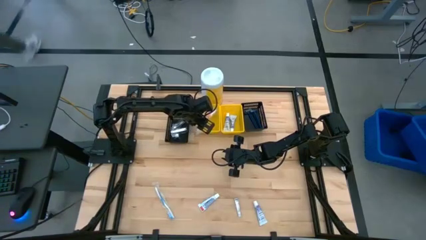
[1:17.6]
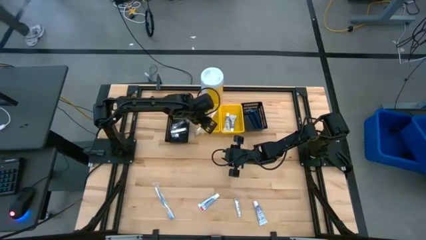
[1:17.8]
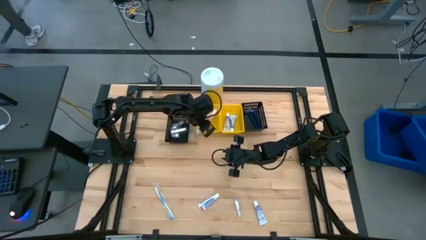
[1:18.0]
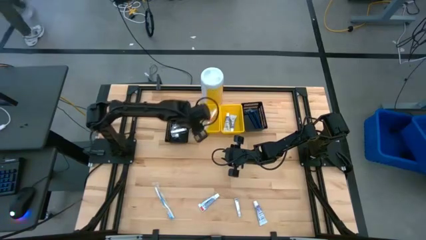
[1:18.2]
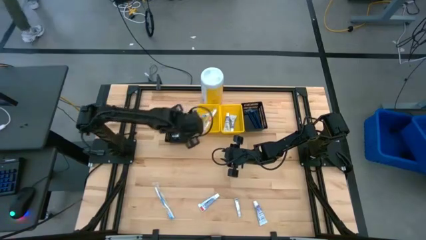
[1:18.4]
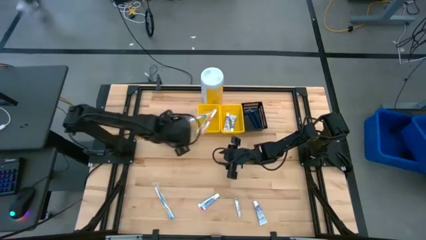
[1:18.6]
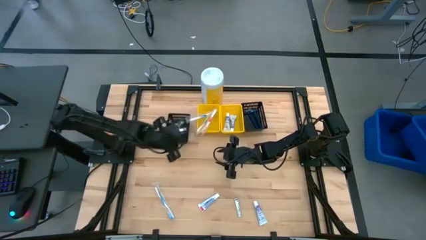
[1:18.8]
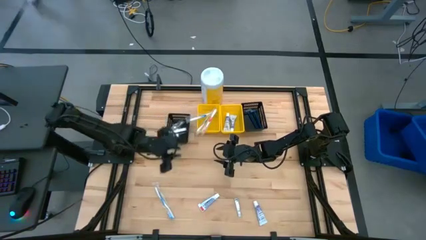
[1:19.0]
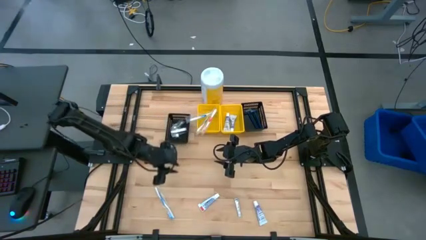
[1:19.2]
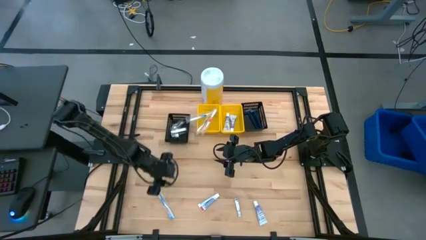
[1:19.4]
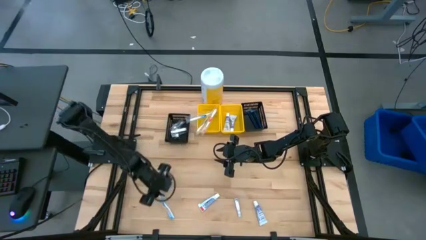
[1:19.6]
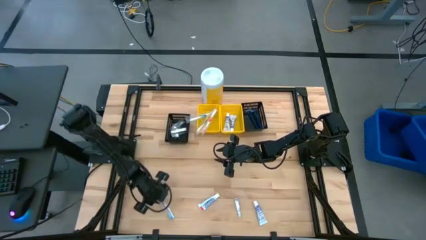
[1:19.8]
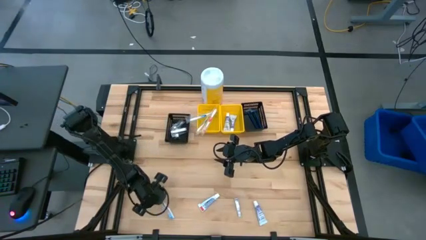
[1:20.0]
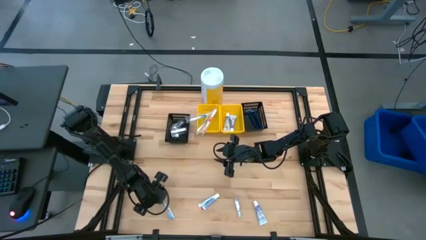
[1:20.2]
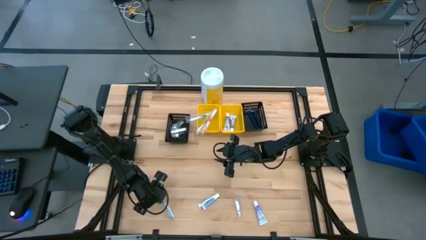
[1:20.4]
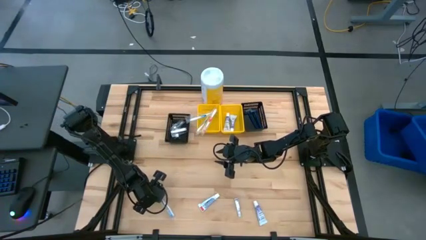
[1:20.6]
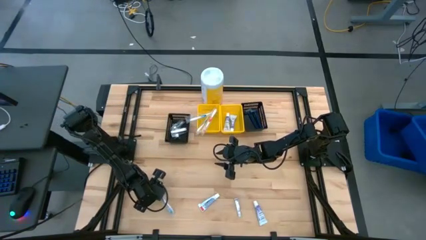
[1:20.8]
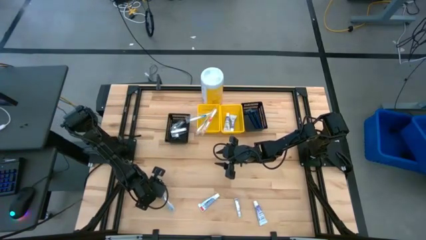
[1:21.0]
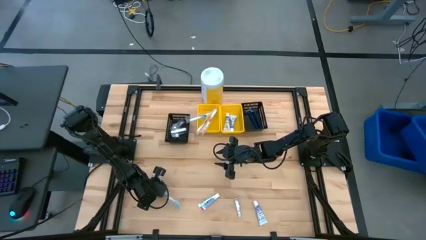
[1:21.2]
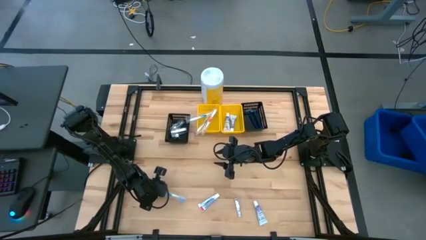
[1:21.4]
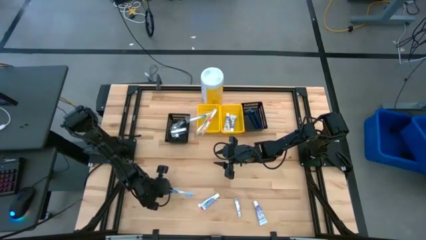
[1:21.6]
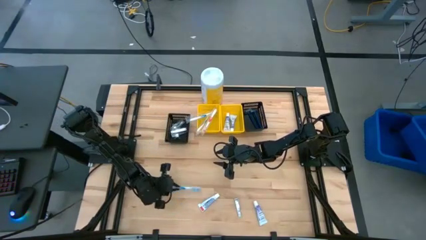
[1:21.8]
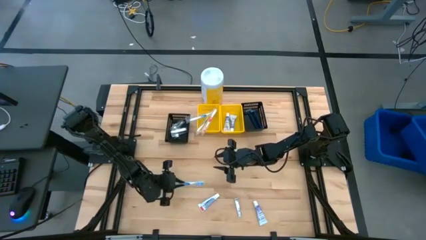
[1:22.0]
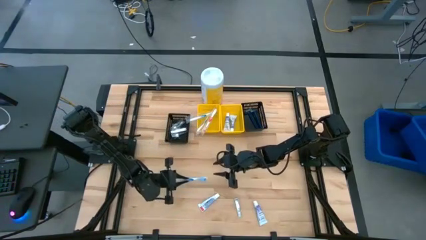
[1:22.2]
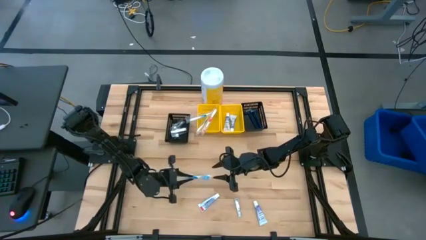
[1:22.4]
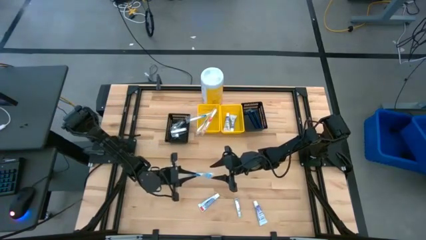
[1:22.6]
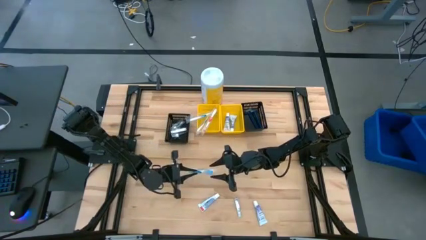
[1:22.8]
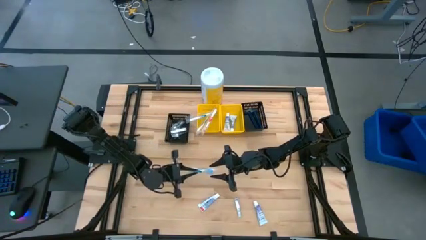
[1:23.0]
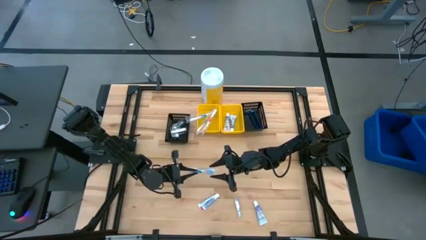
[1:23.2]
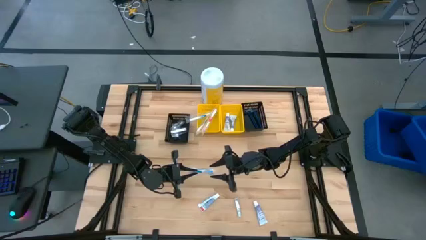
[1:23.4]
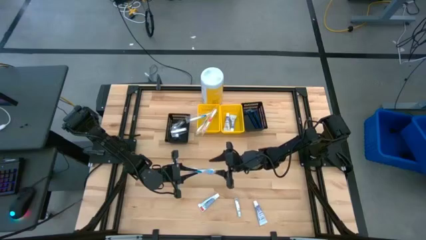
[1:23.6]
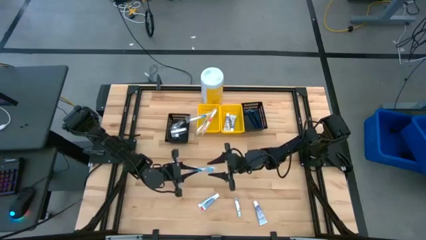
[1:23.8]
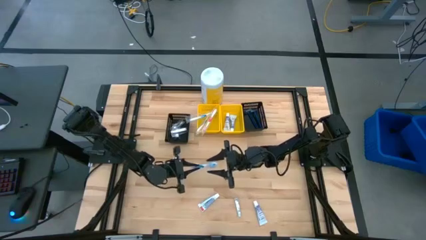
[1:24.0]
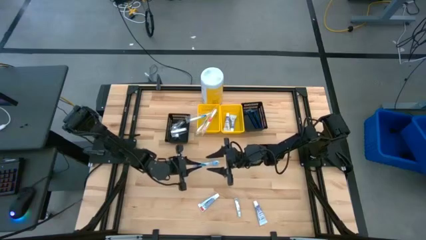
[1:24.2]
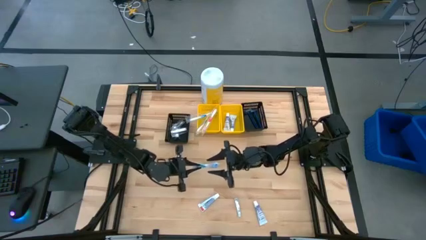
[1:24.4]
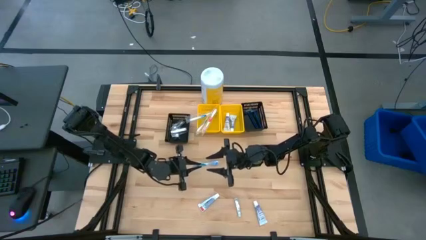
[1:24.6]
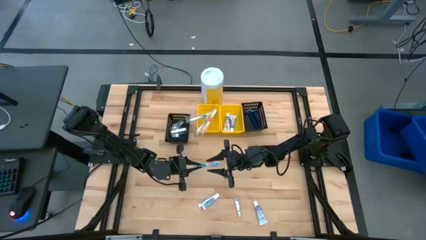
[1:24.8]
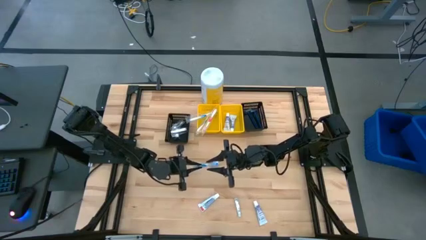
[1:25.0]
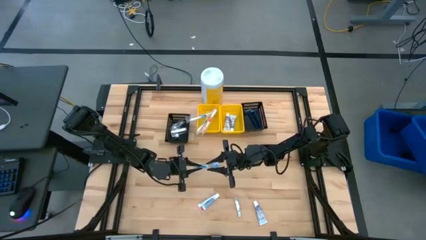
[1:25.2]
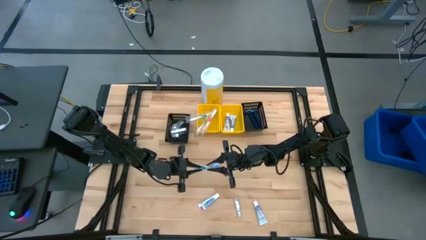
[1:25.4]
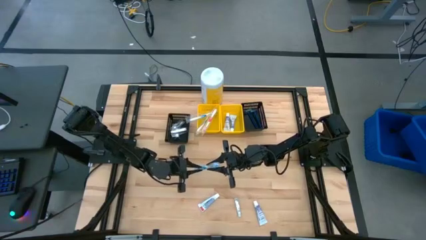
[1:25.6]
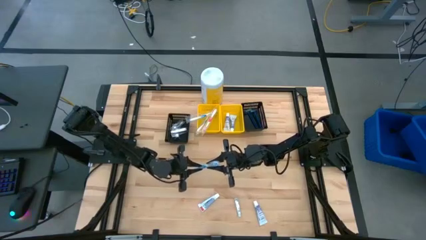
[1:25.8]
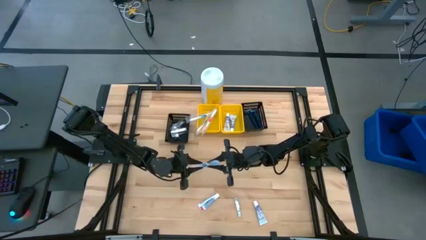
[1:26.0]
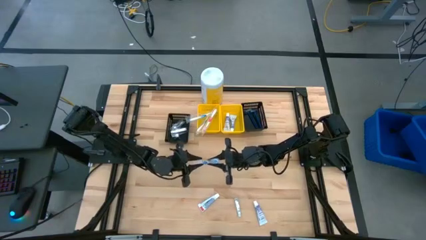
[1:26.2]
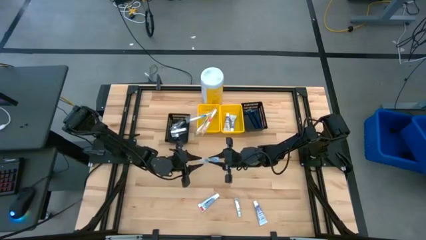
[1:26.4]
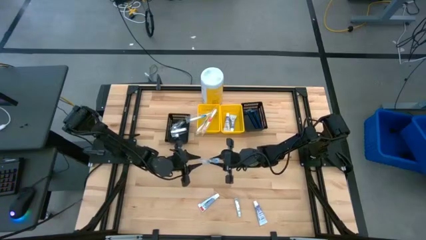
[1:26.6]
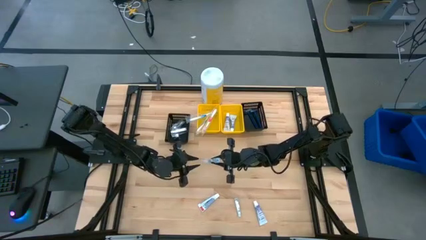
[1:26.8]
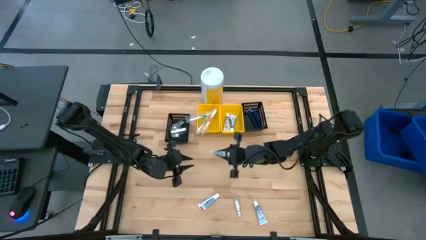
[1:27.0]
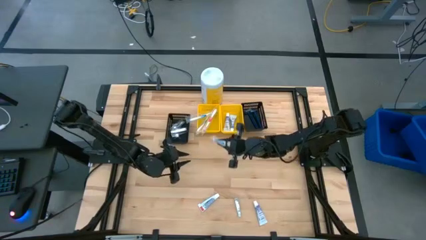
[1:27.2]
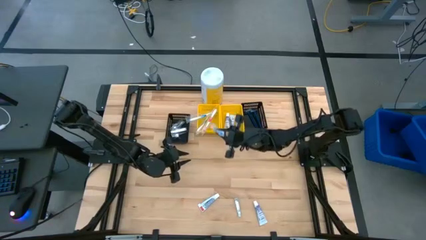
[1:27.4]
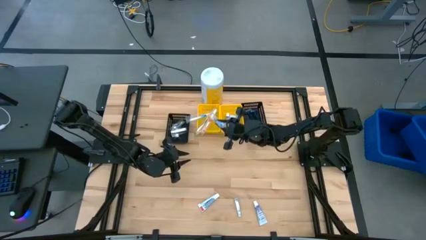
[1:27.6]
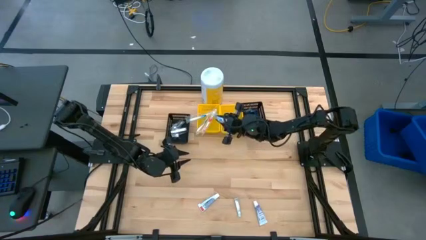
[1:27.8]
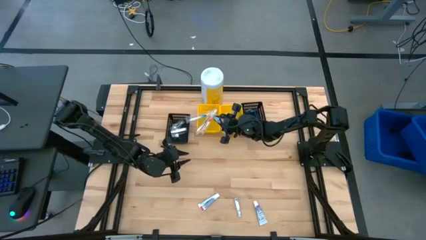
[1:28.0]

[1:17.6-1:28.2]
Task: Pick & Place Travel size toiletries
Put the blue toothbrush into the left yellow bin

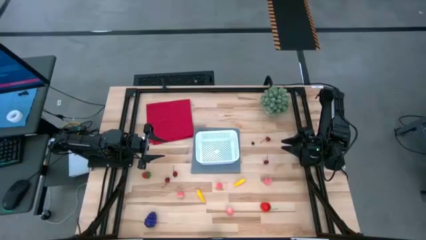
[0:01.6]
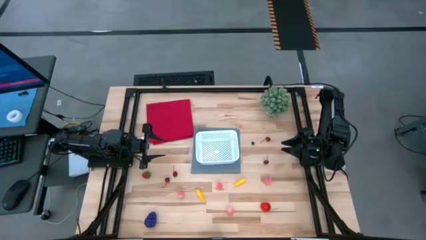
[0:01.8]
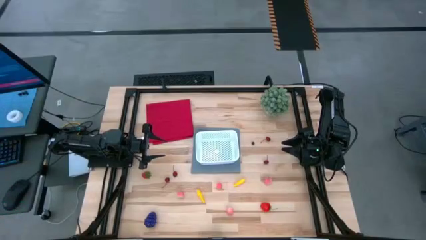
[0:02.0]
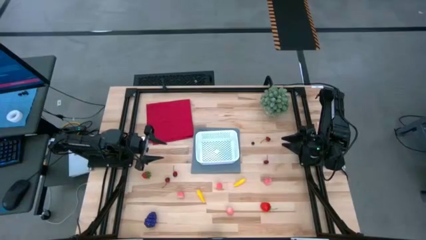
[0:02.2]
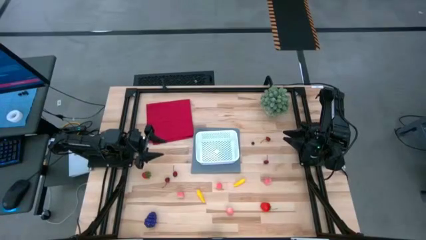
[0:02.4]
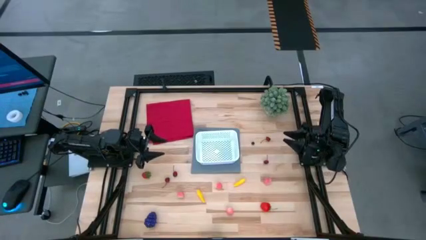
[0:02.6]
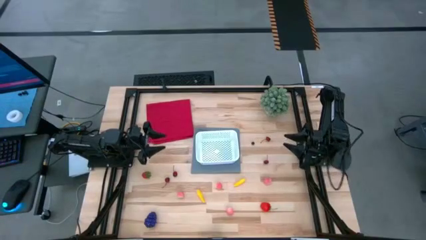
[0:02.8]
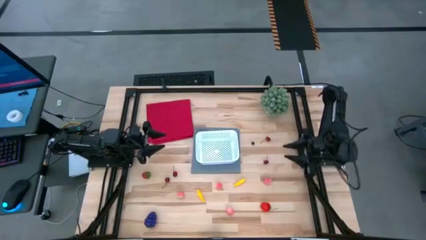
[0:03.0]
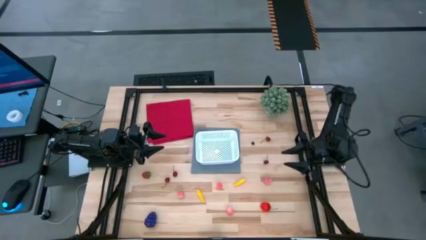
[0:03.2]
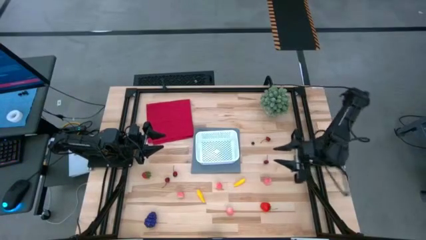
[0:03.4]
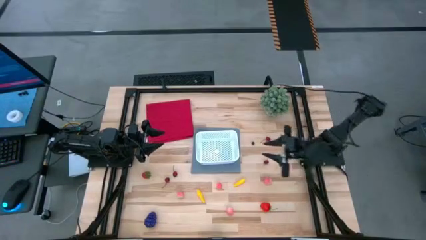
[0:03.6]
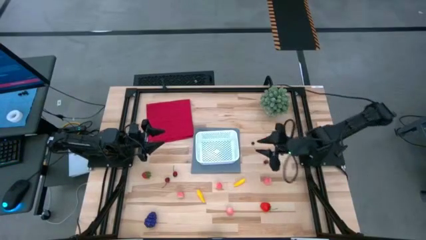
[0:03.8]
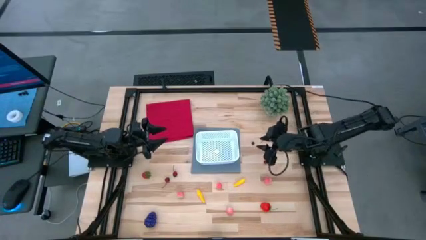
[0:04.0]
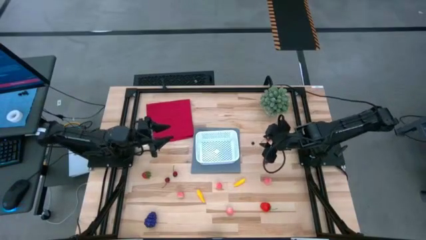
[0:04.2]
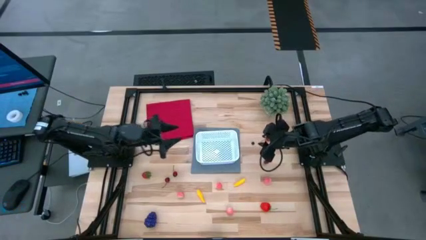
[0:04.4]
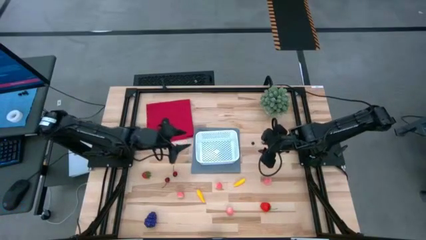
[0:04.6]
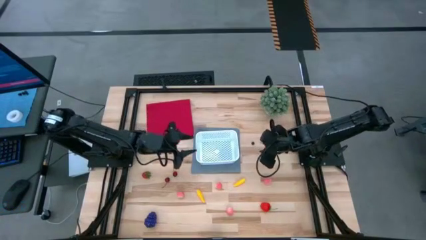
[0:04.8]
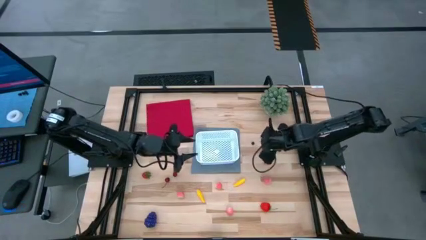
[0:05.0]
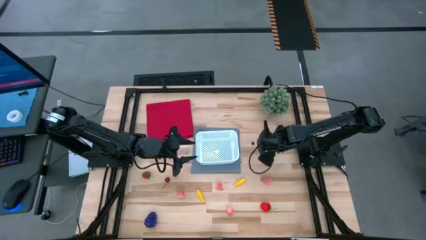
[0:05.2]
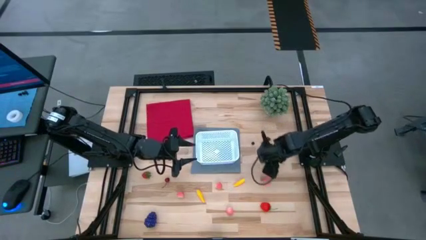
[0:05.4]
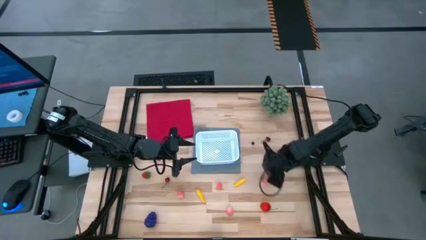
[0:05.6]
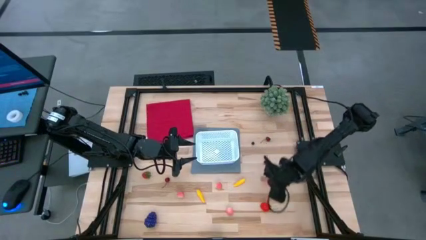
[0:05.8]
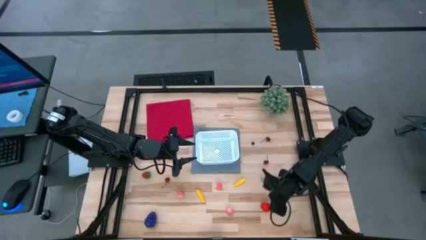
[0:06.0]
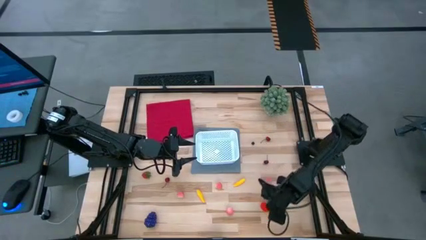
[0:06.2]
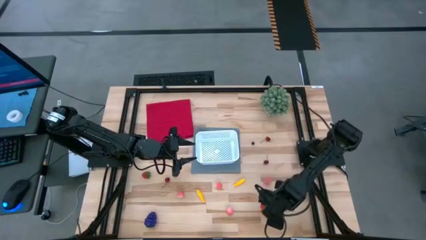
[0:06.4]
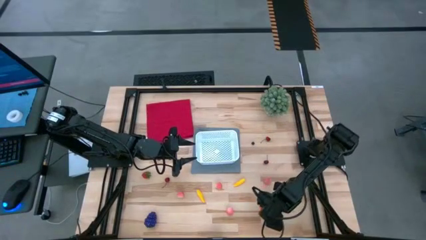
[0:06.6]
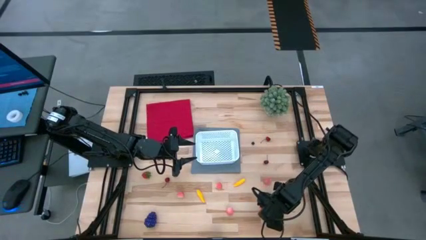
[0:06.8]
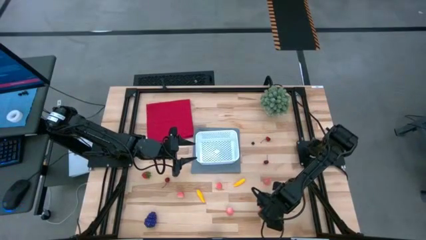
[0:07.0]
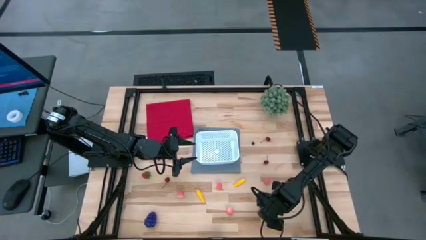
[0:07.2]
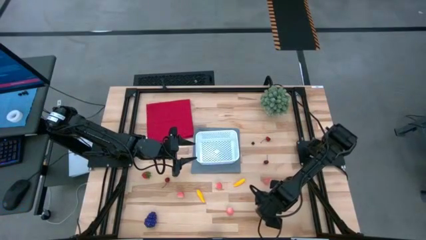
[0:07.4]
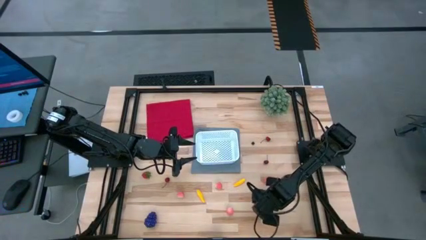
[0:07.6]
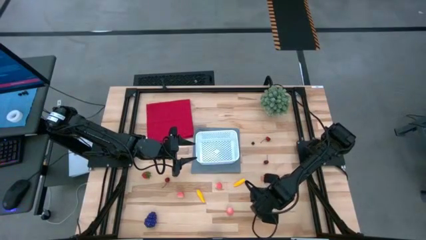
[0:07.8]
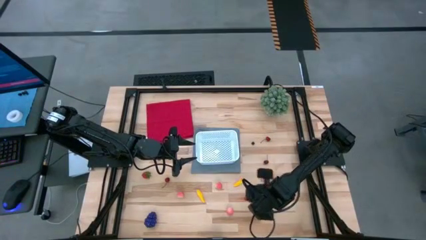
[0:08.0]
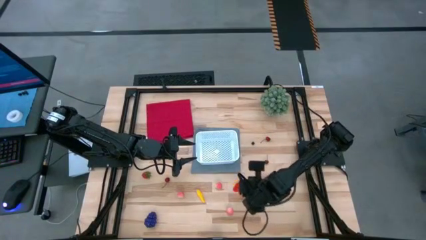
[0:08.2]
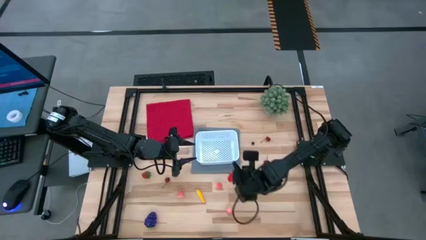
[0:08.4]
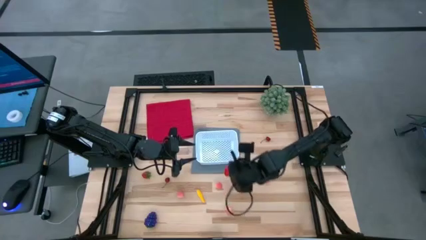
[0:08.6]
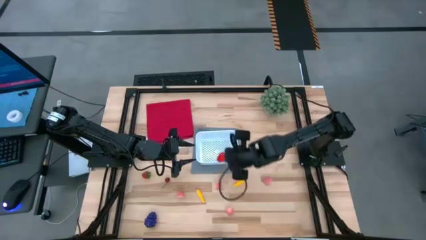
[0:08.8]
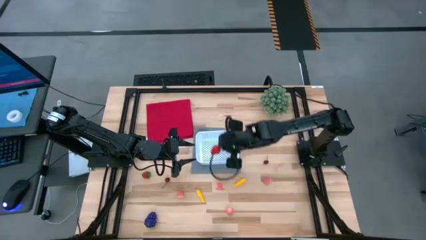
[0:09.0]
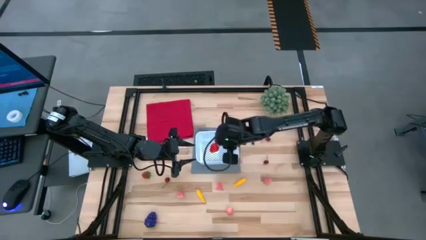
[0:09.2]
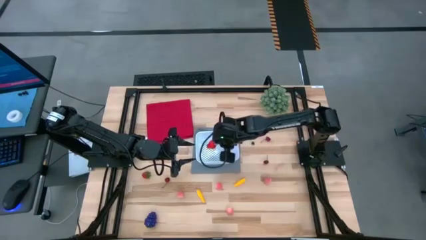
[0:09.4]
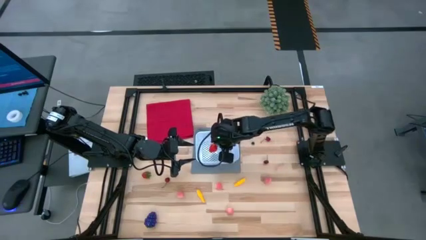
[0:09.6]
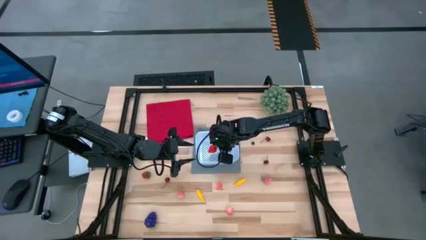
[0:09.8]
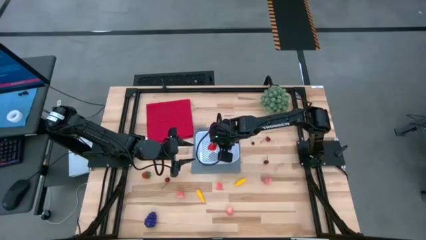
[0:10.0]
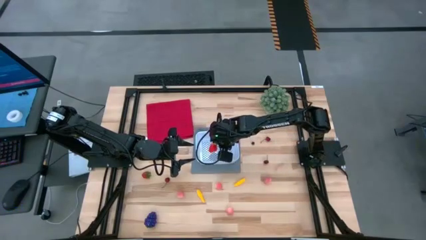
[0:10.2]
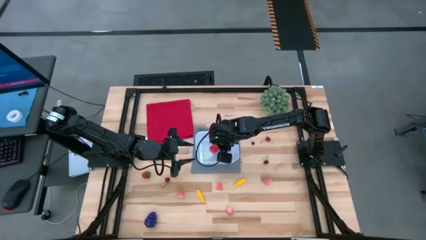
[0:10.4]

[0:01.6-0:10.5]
Task: Pick and placing Produce into tupperware
Put the right strawberry into the white basket
